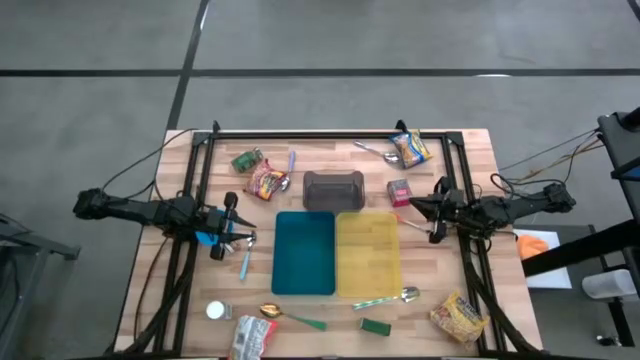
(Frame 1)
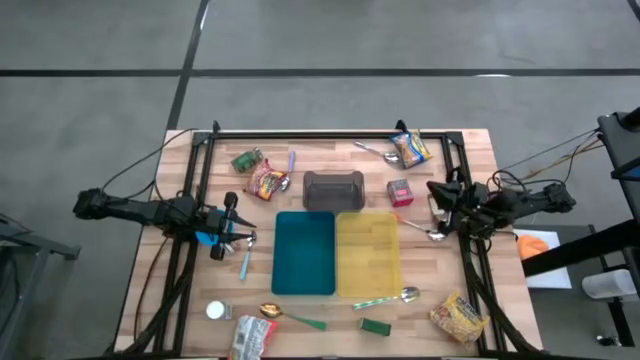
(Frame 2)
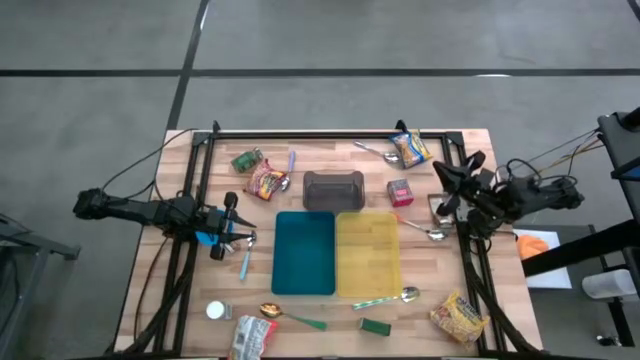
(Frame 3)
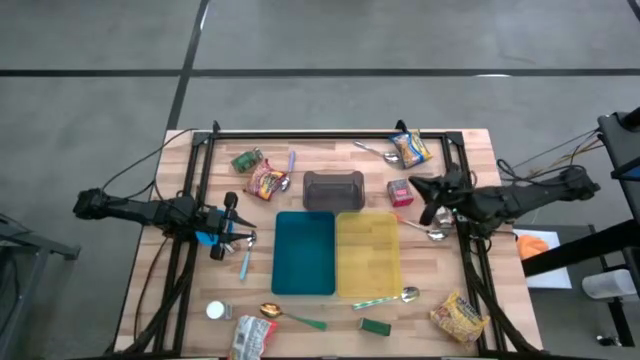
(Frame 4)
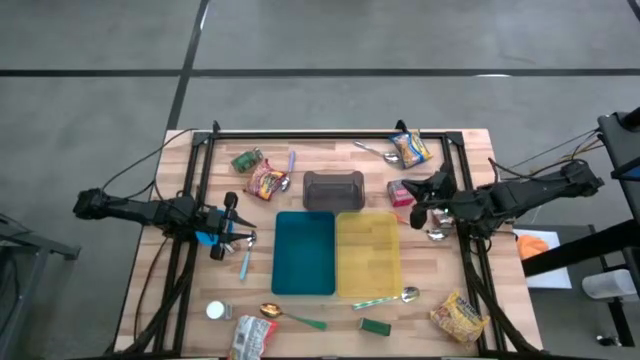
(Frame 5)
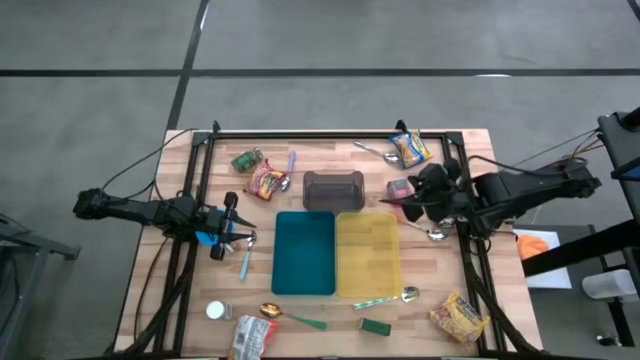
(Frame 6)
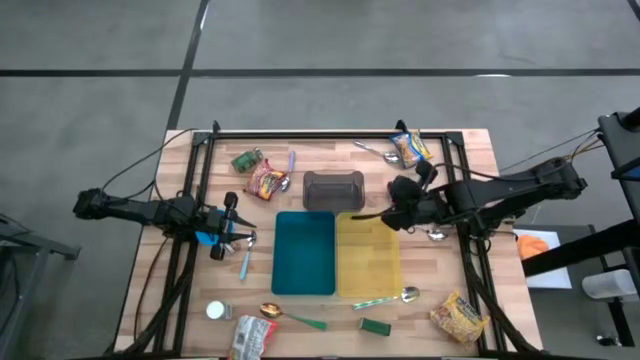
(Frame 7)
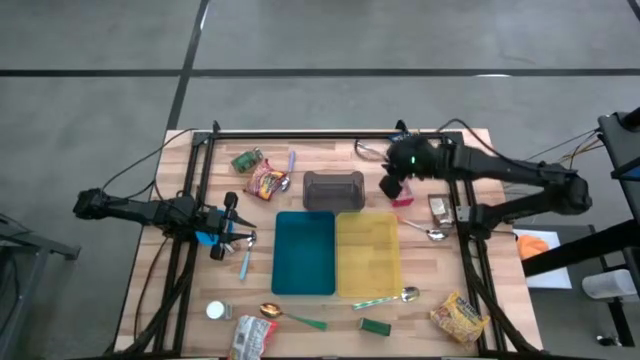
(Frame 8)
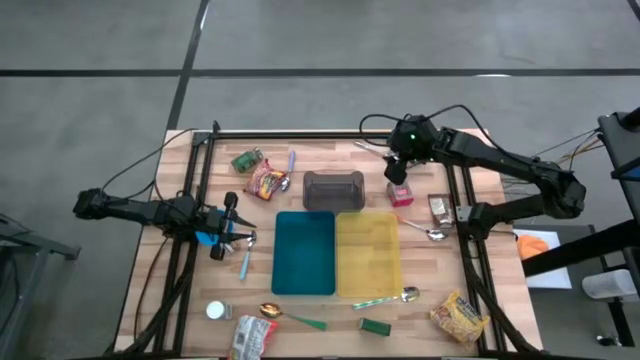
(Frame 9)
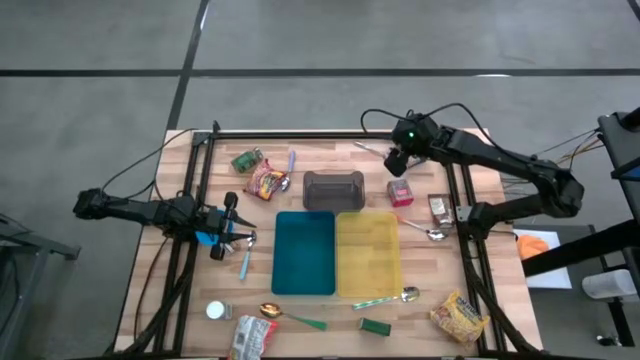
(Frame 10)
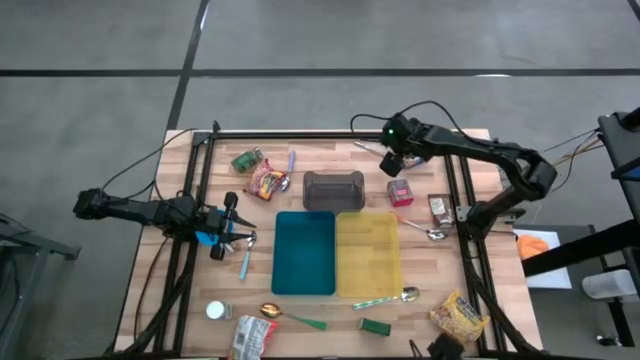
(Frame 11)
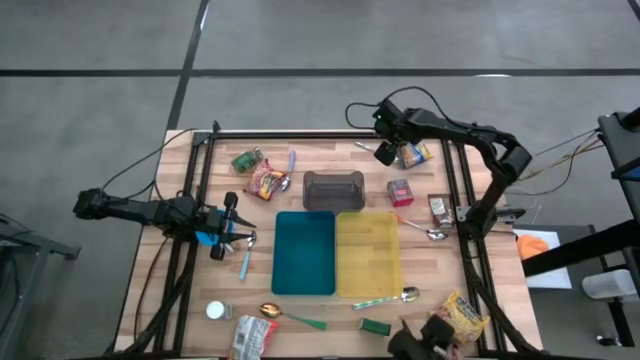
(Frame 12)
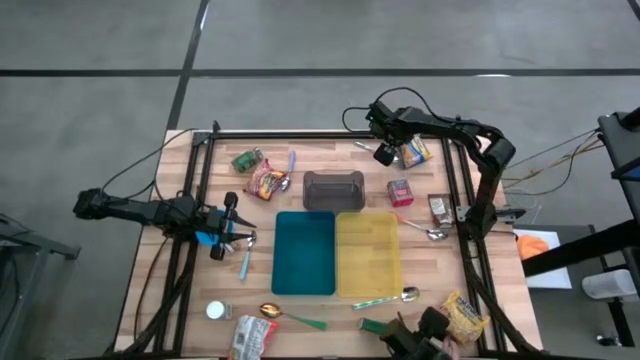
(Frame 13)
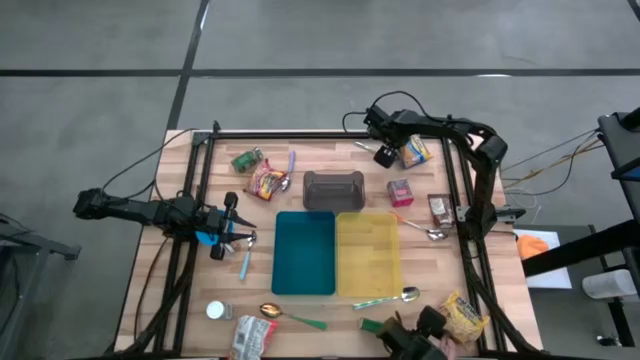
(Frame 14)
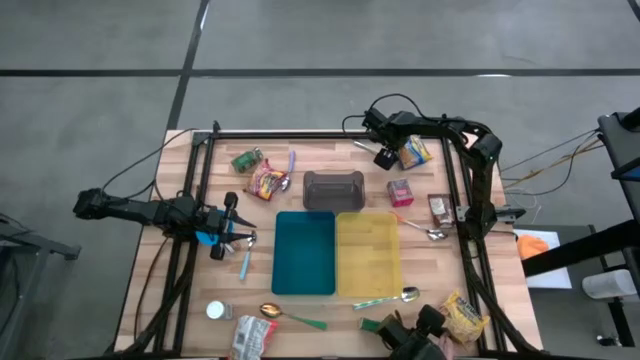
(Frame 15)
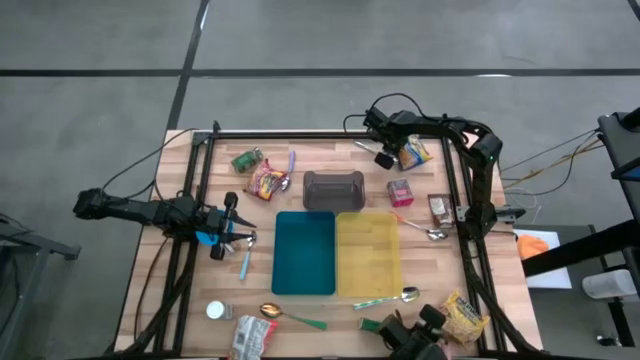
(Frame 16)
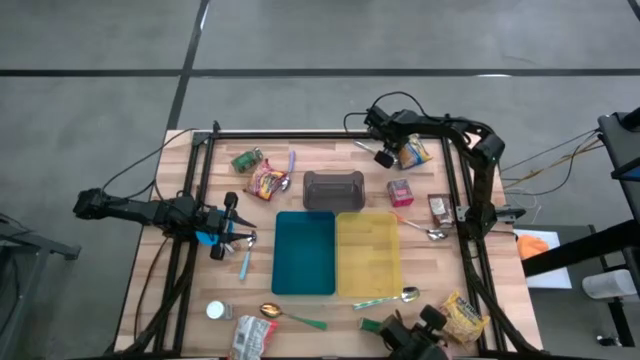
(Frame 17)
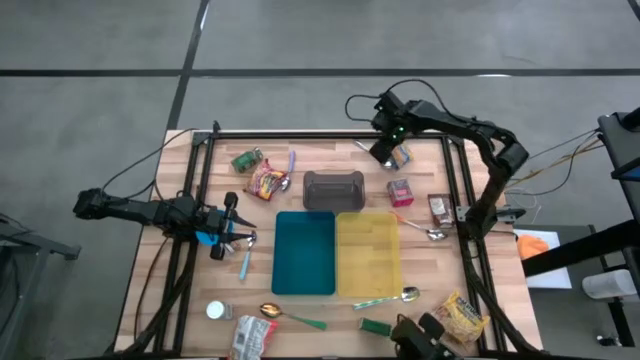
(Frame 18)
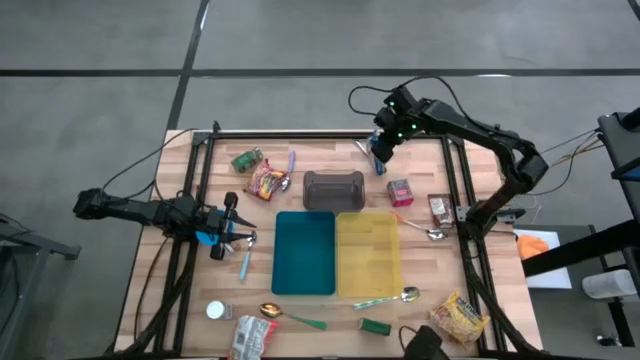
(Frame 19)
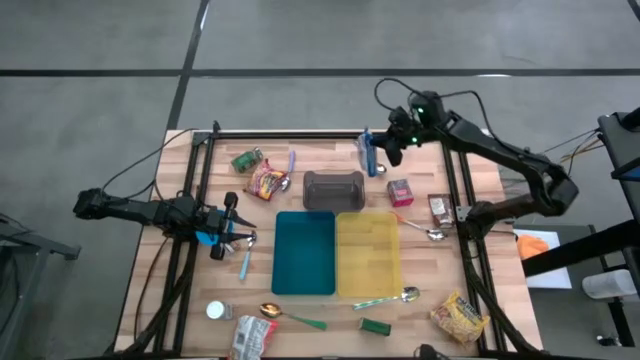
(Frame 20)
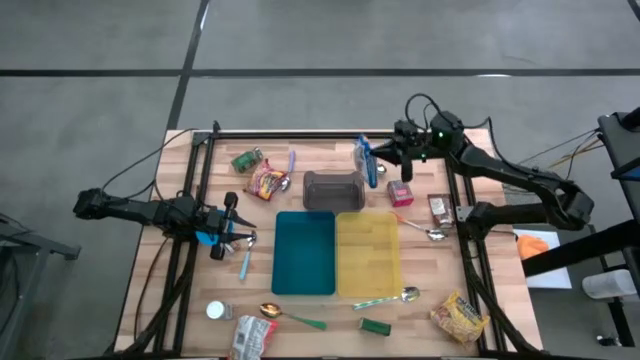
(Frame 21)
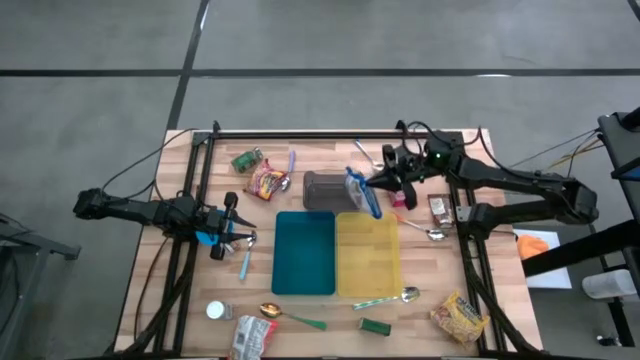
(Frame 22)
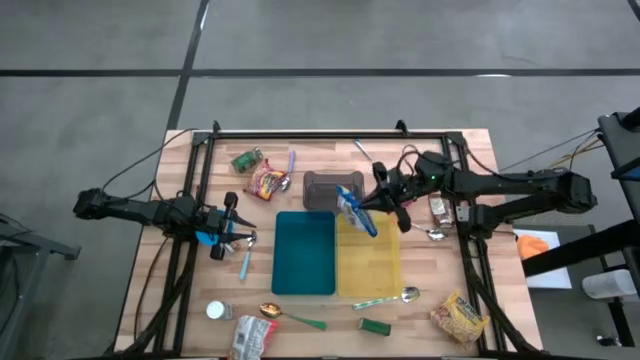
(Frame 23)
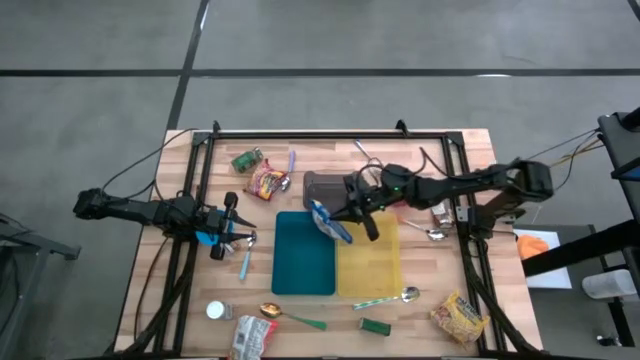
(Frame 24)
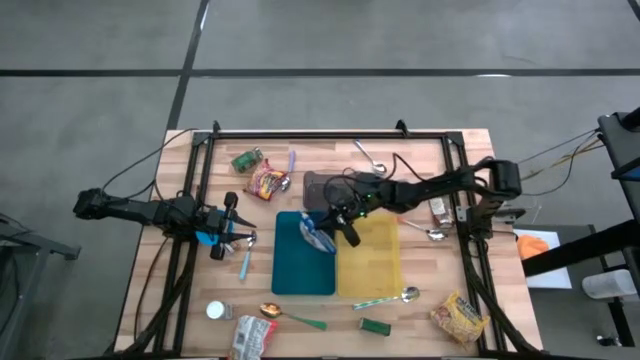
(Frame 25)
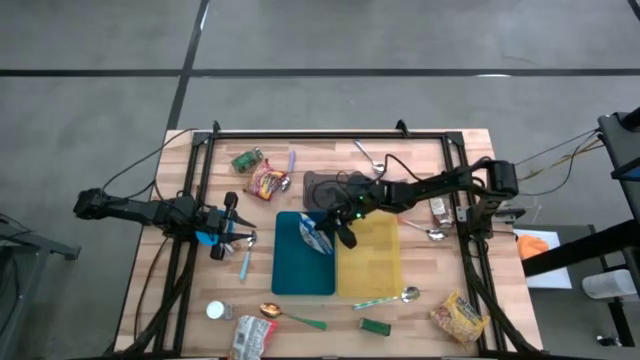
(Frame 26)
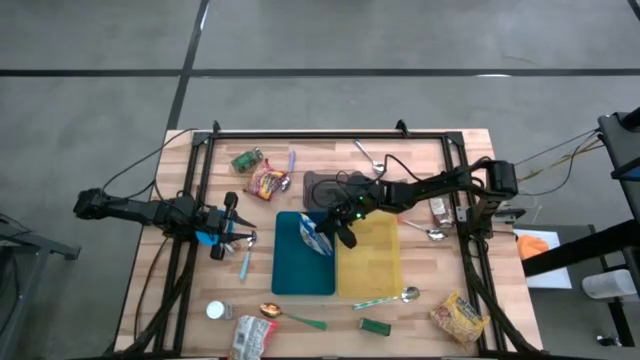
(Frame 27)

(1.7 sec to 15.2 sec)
Put the blue noodle pack into the blue bin
